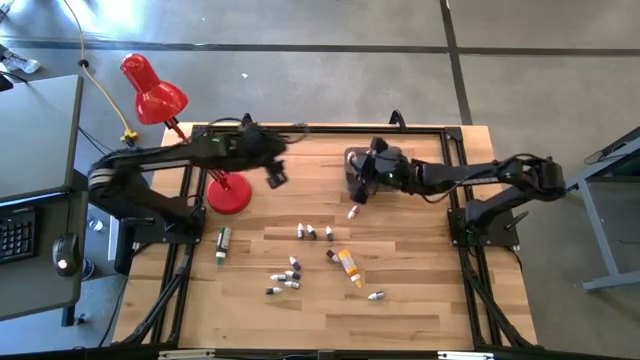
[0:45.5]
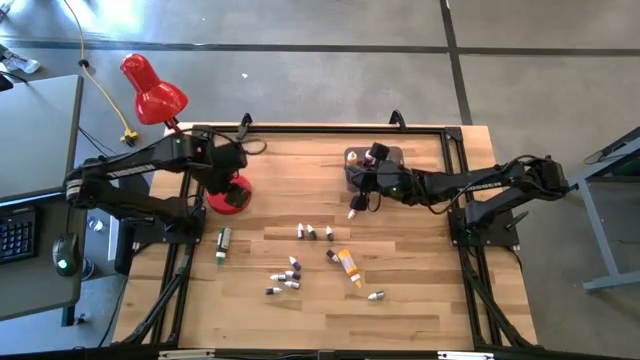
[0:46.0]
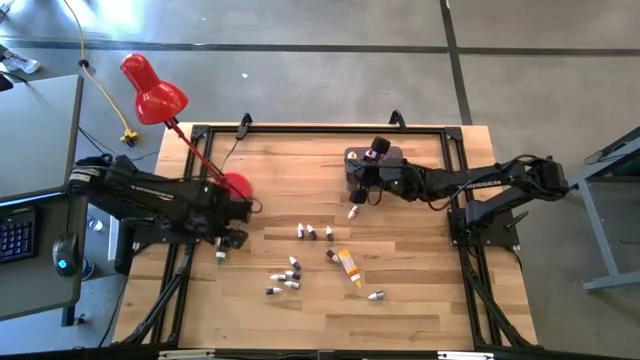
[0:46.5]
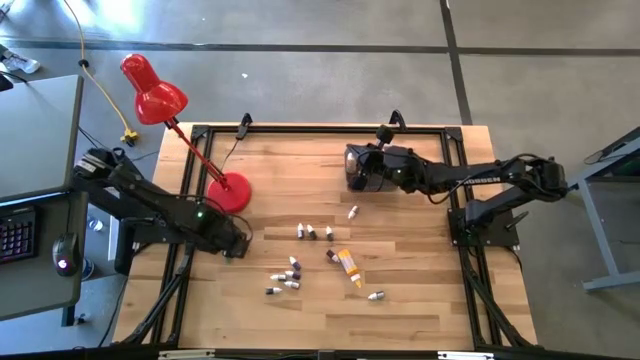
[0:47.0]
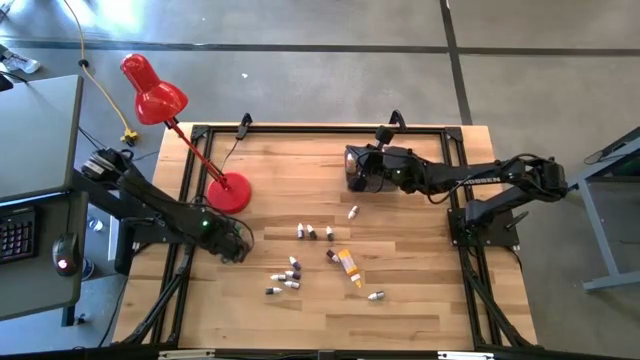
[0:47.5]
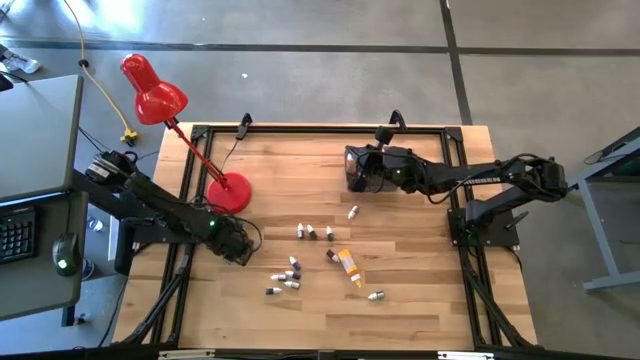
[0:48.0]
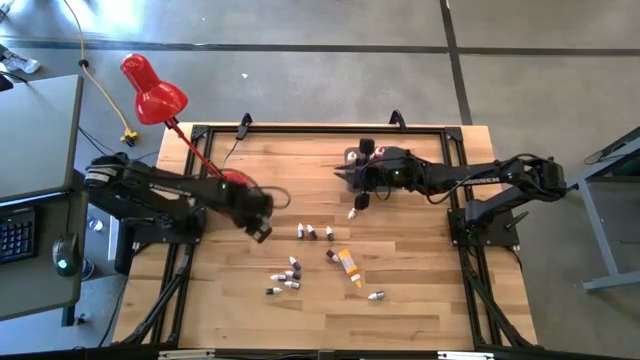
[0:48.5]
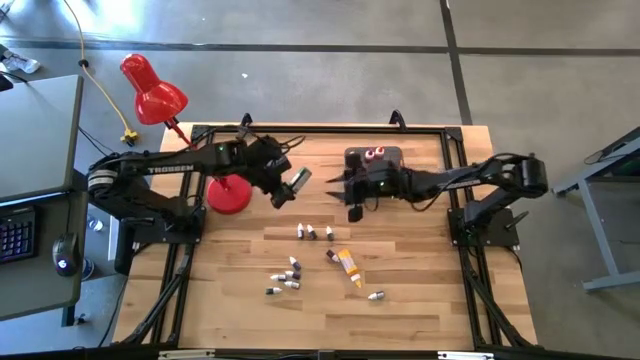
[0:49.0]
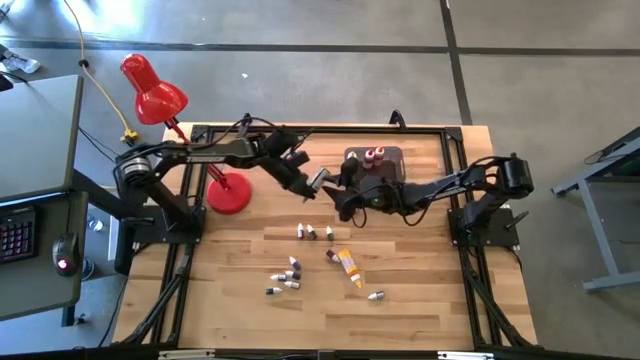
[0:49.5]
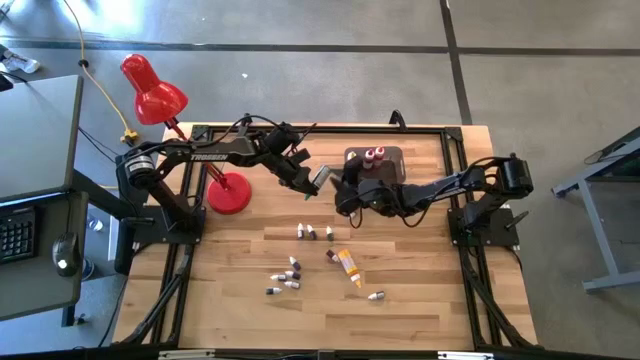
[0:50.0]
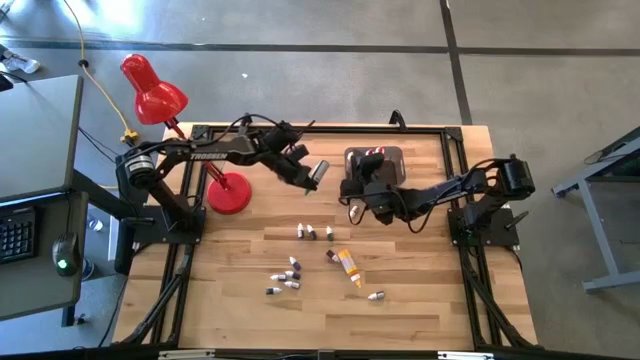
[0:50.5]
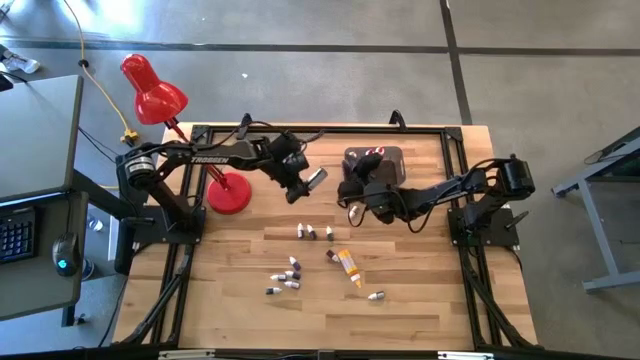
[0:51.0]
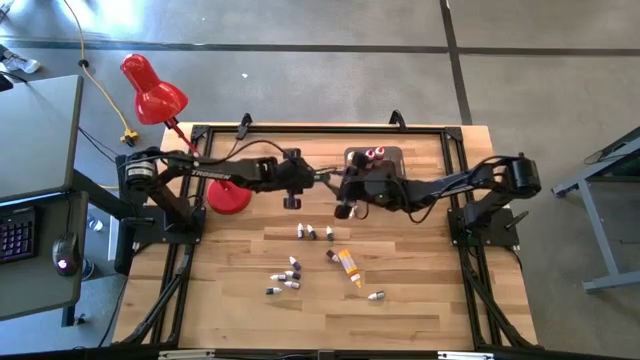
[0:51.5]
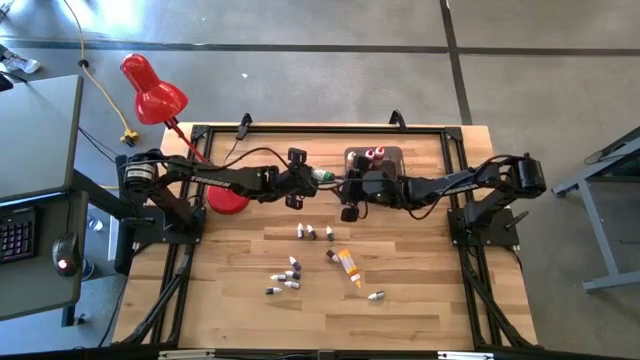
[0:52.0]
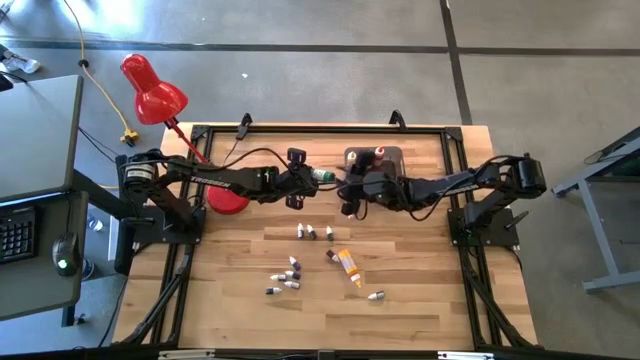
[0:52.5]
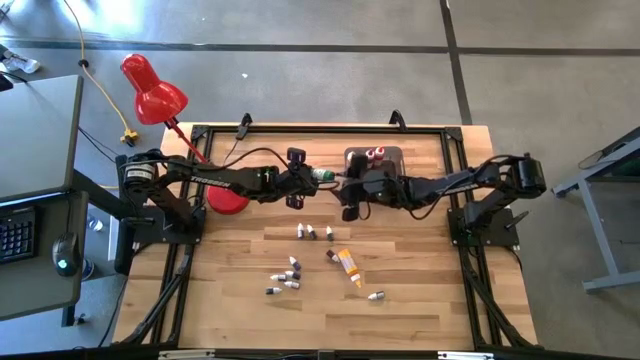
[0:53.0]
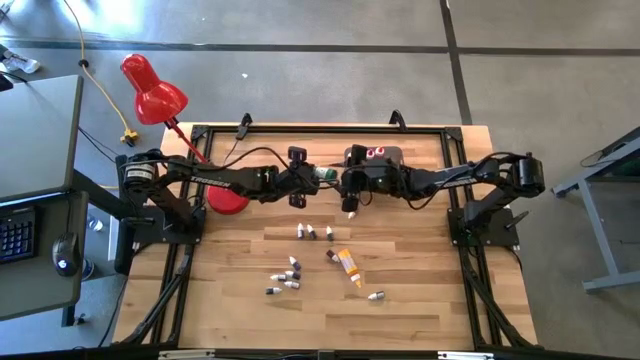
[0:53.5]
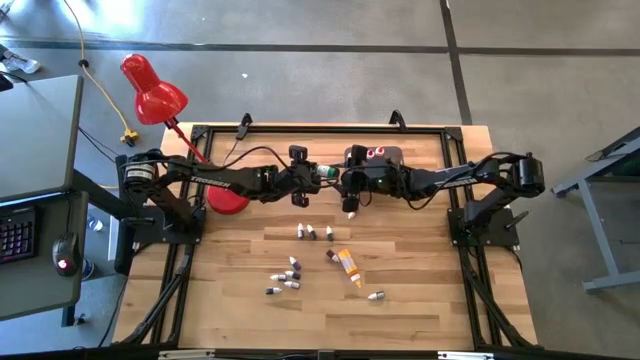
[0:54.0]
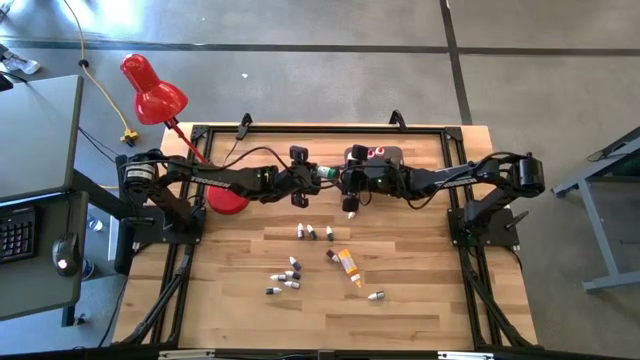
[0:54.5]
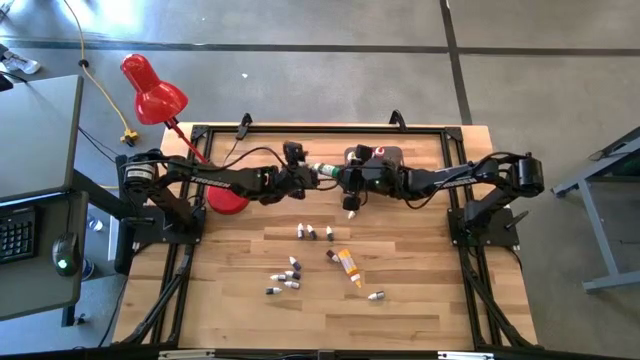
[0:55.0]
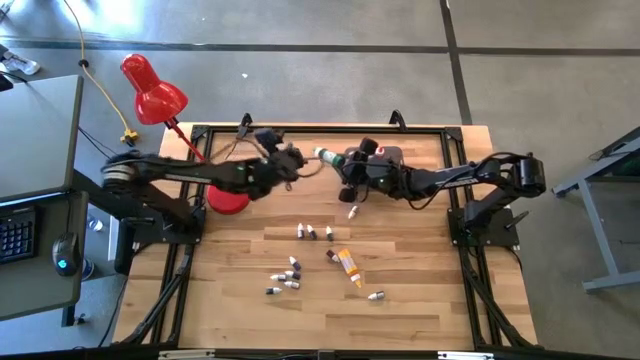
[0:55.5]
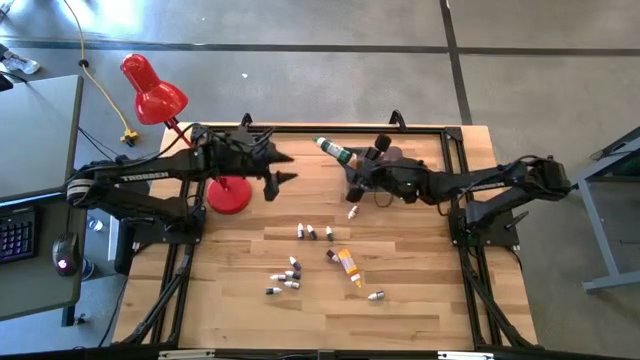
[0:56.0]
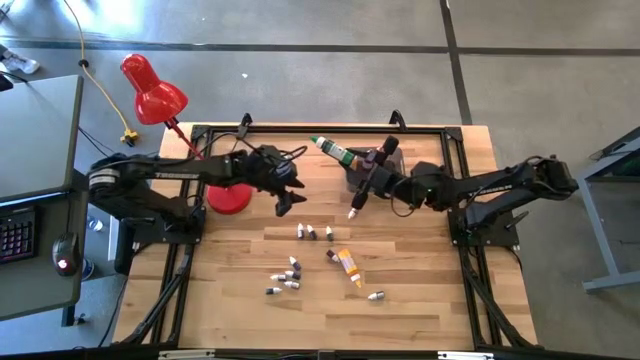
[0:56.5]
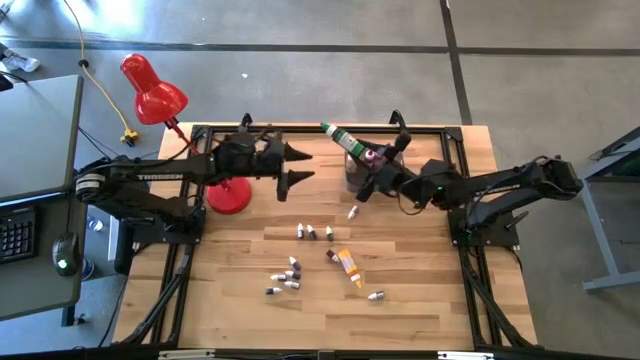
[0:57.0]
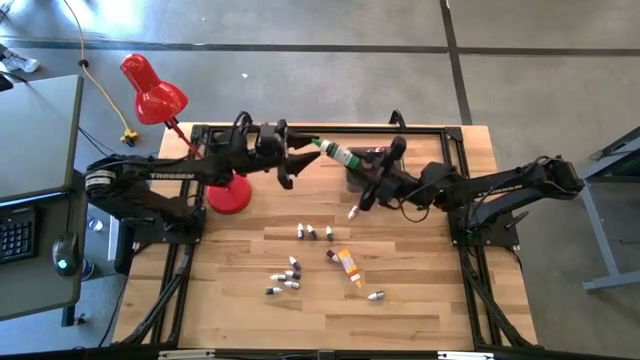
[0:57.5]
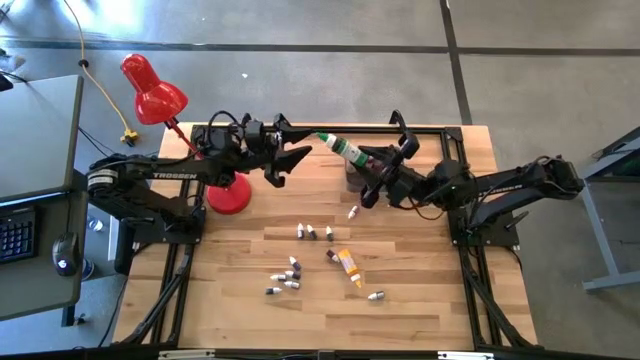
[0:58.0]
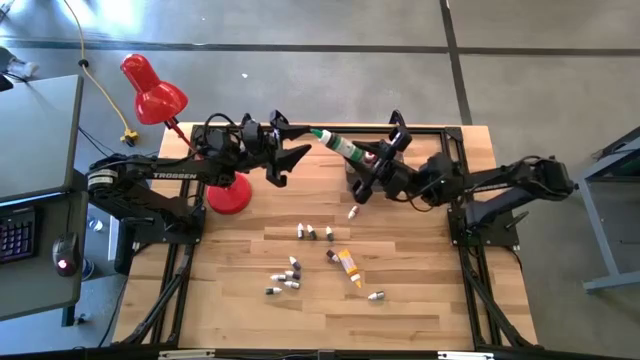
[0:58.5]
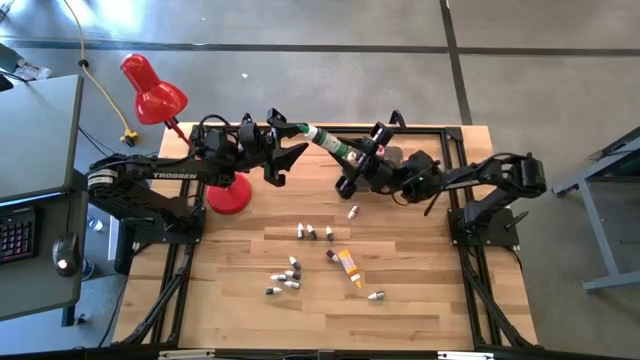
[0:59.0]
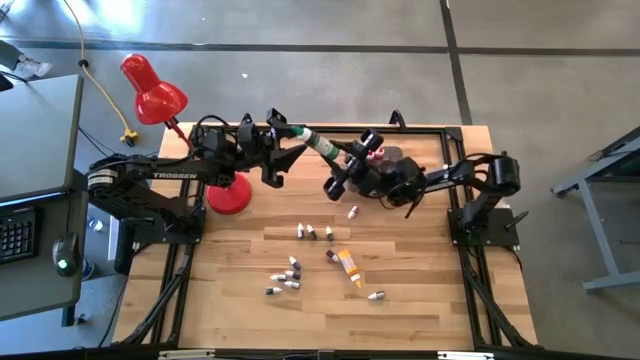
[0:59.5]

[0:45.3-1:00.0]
Task: Pick & Place food coloring
Put the large green food coloring bottle into the bin

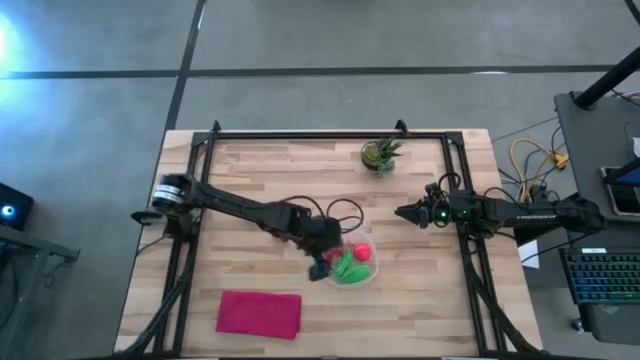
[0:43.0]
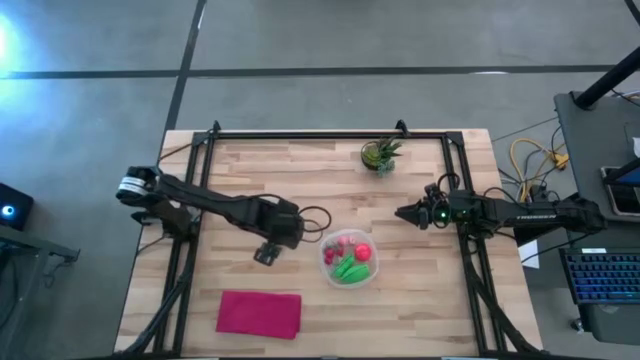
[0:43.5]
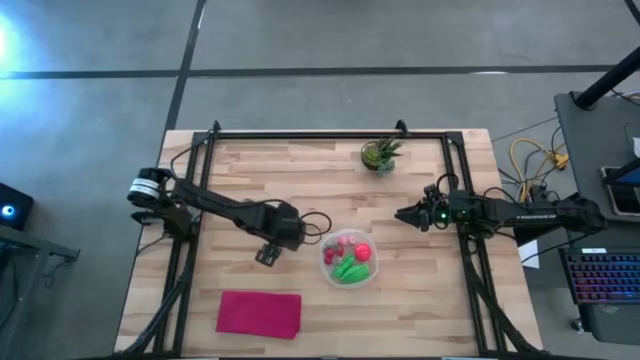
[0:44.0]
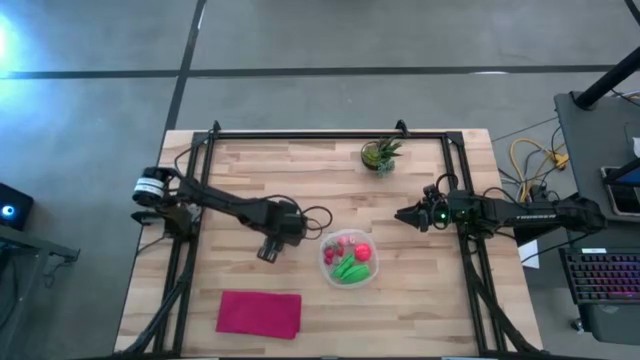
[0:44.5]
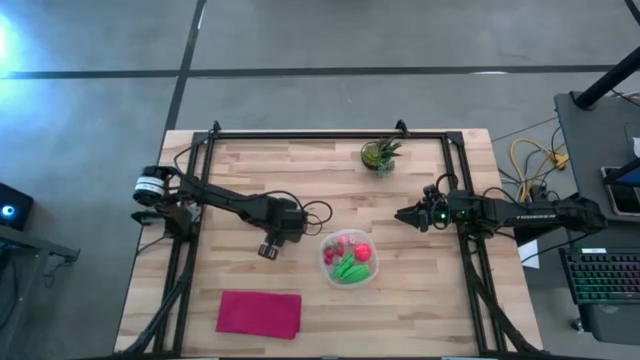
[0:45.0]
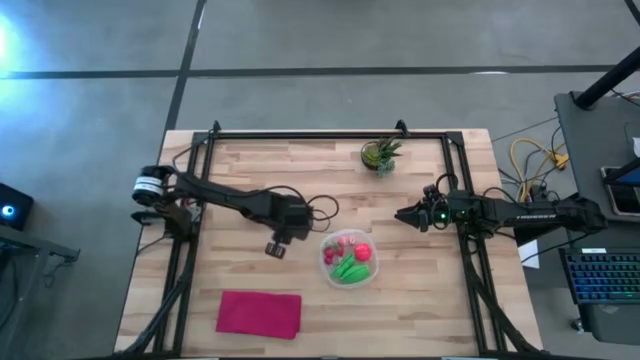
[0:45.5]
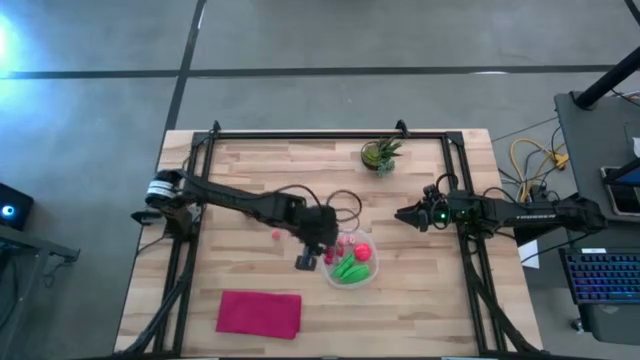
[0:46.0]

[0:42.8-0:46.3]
Task: Pick and placing Produce into tupperware
Put the cherry into the container

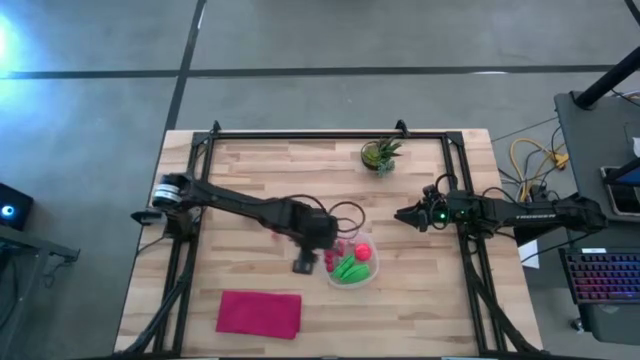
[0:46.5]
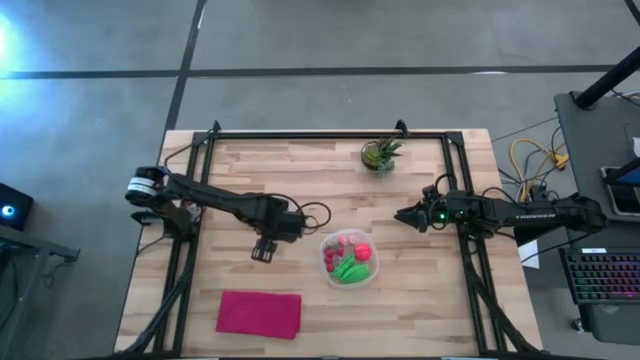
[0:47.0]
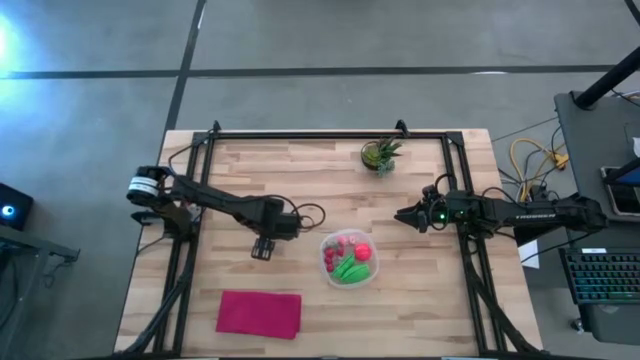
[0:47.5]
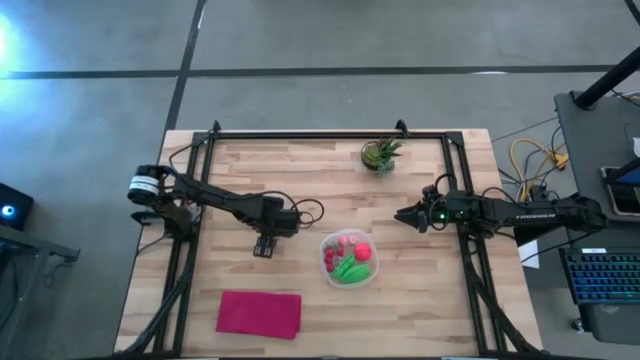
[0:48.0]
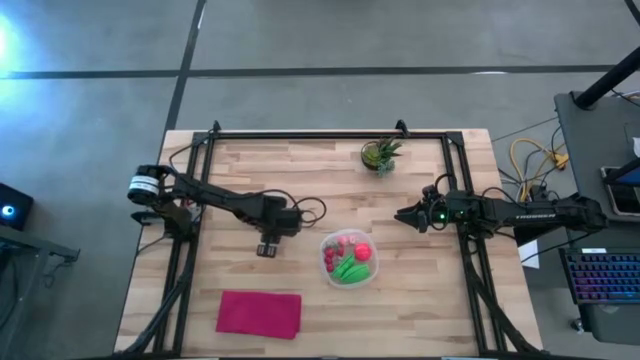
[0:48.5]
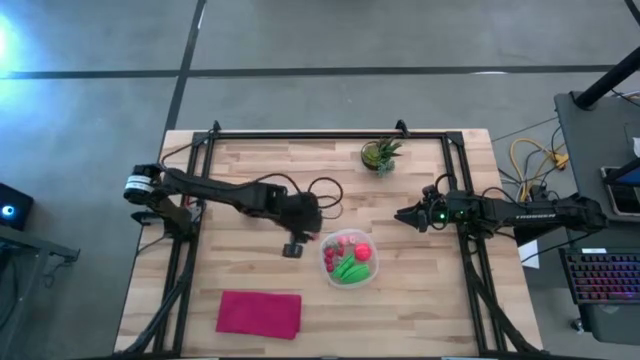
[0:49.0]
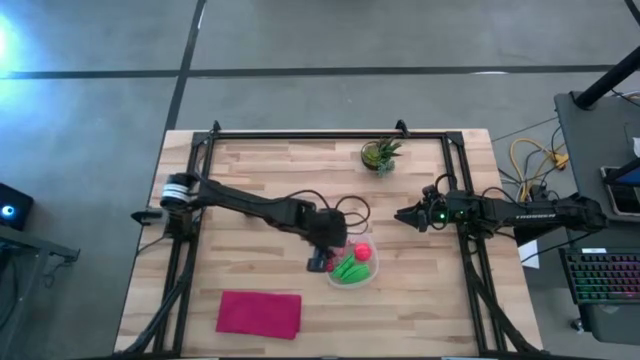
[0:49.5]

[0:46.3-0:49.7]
Put the peach into the container
